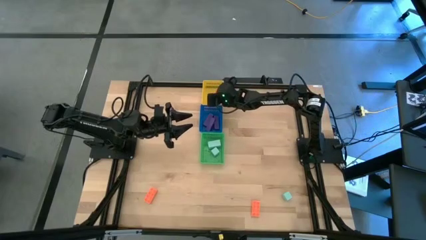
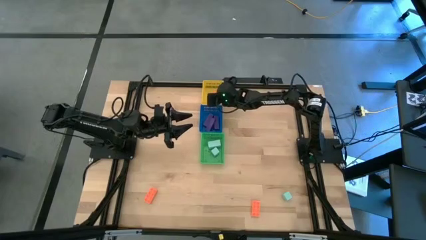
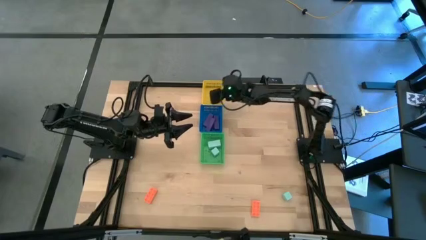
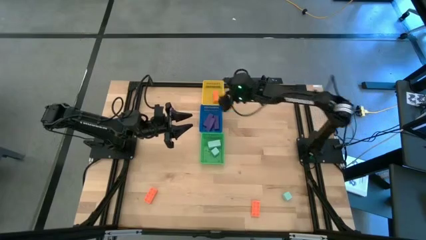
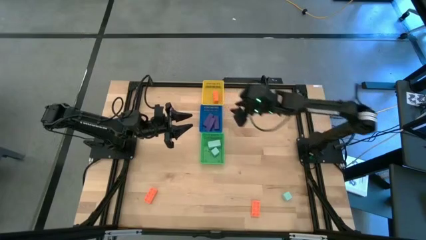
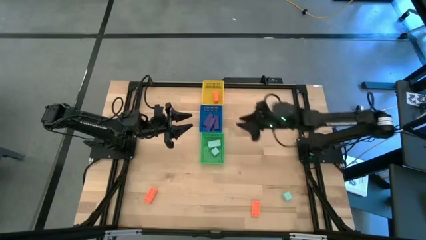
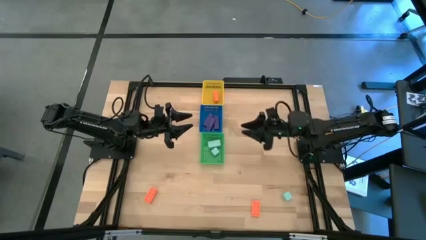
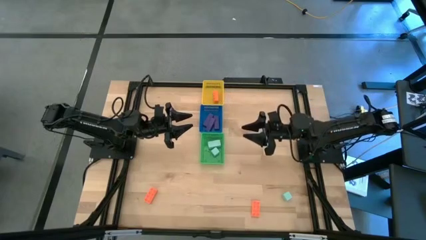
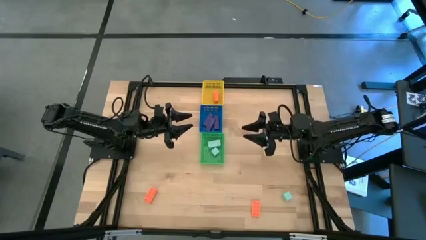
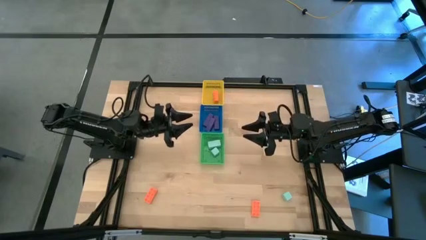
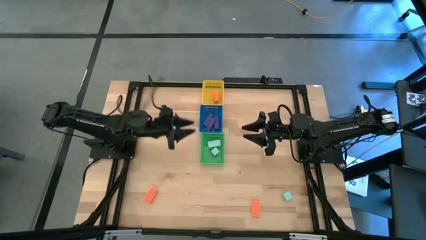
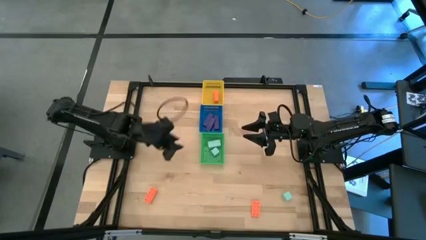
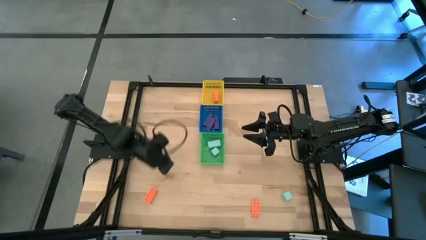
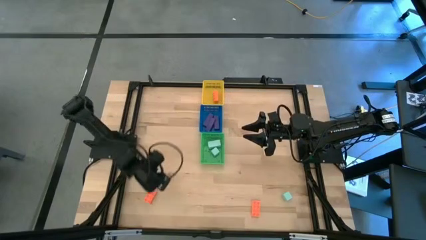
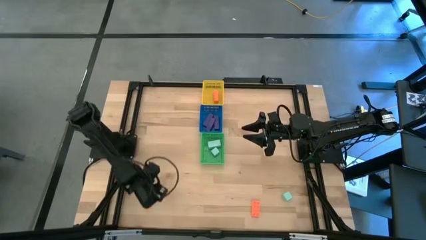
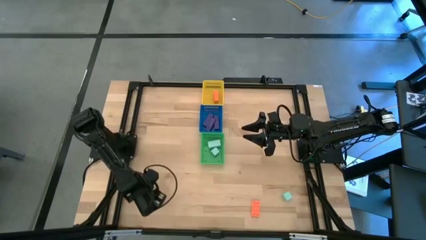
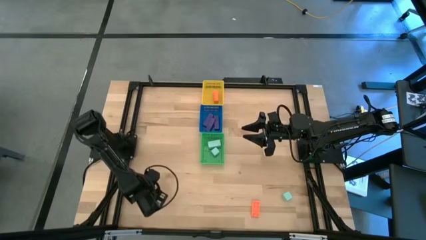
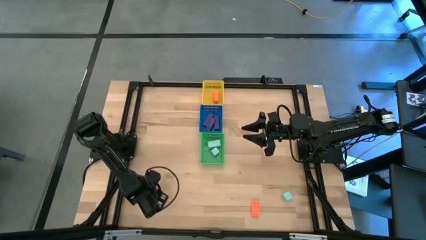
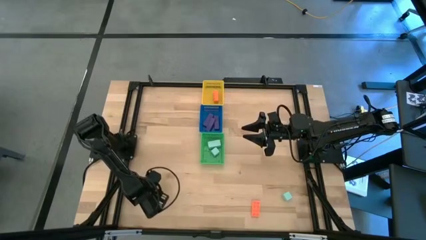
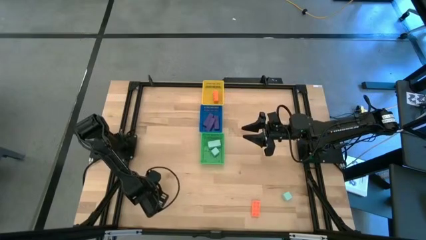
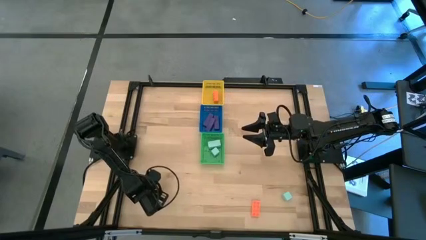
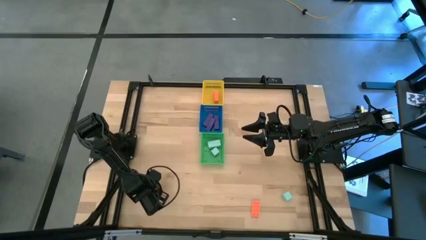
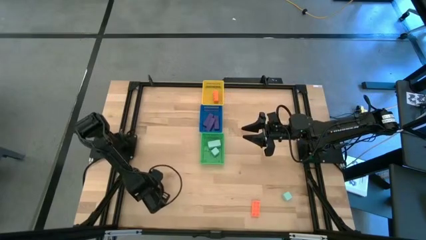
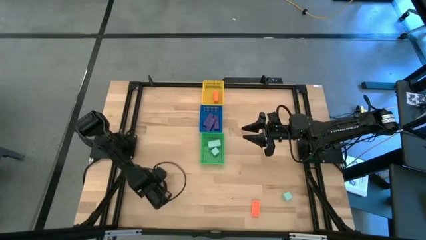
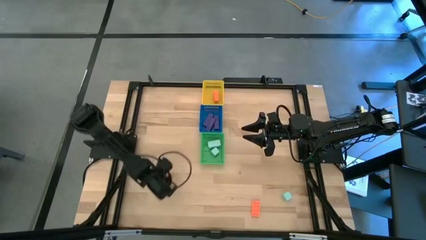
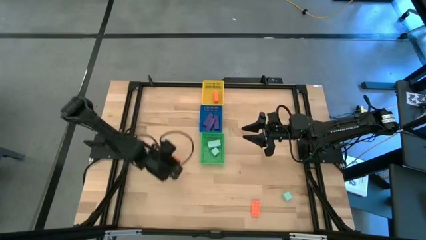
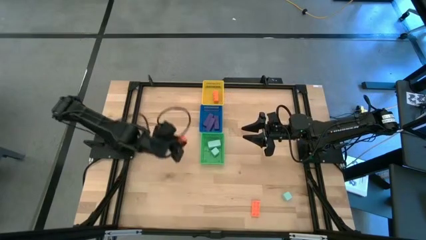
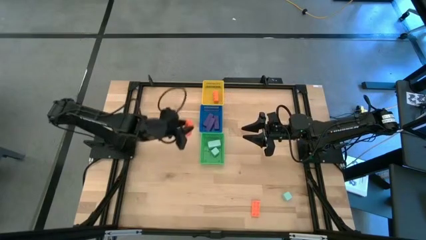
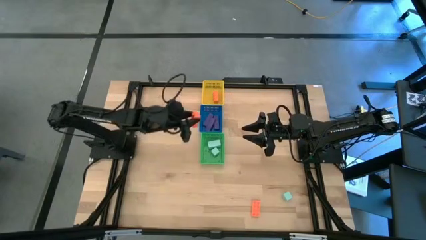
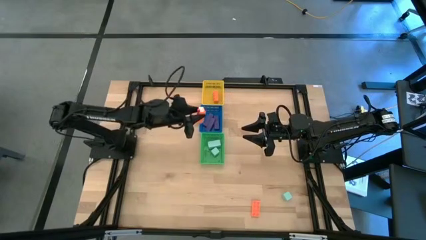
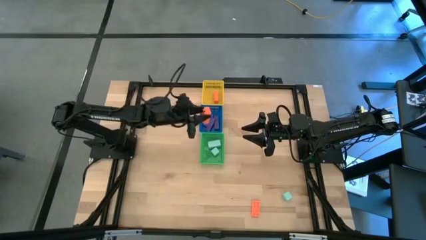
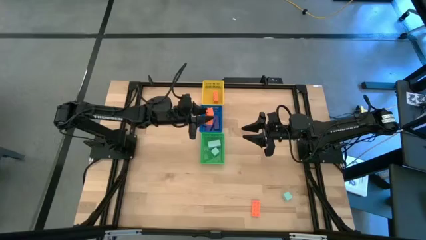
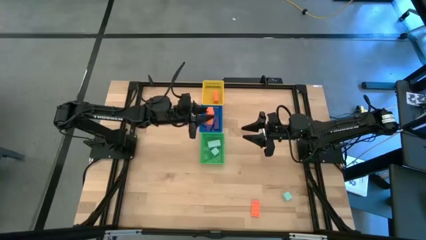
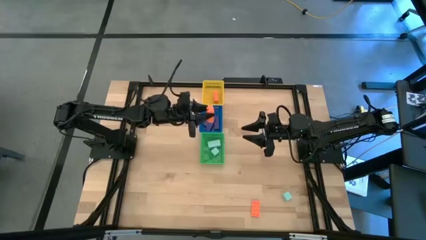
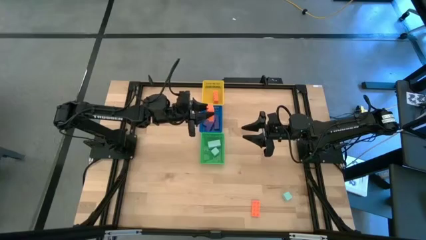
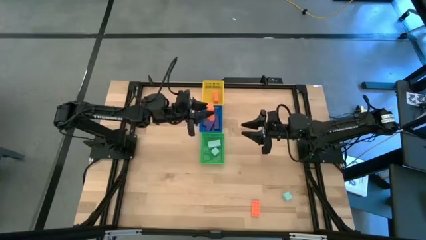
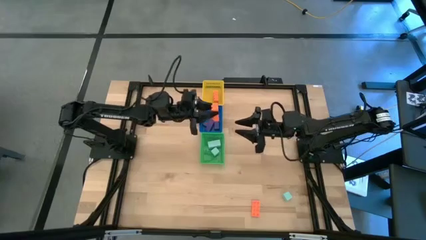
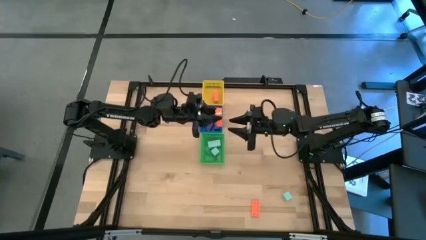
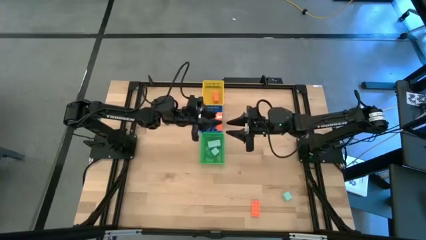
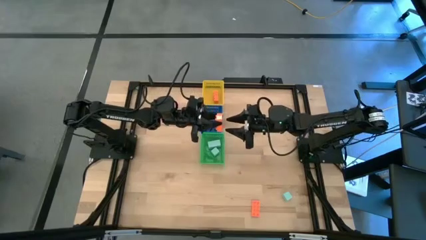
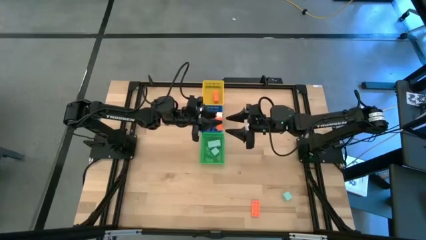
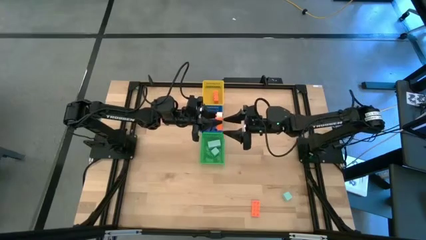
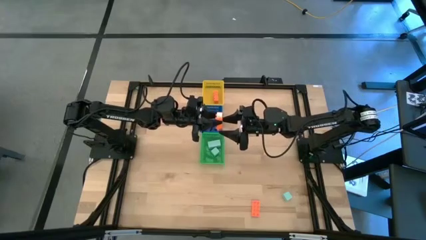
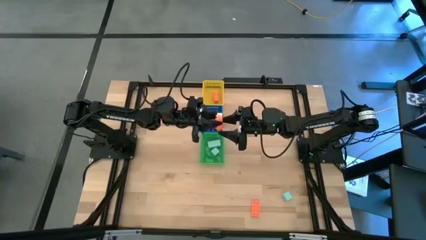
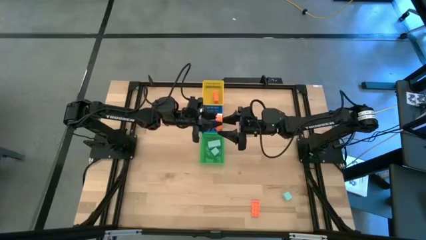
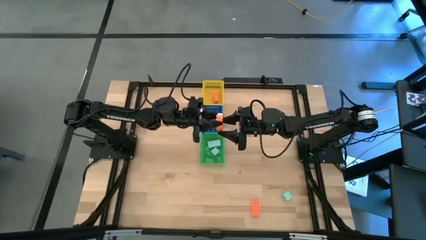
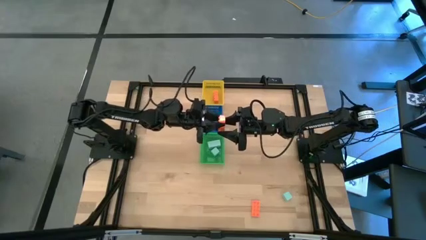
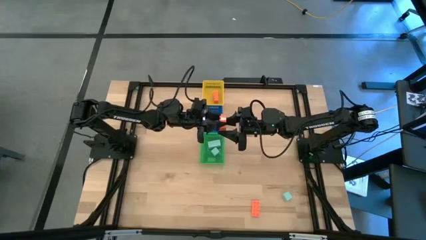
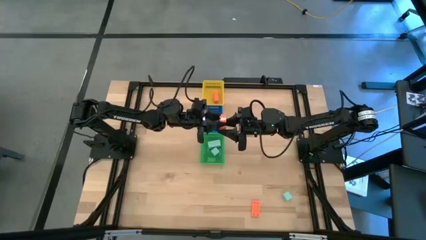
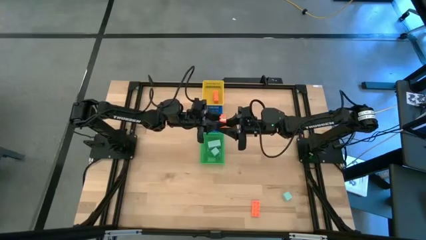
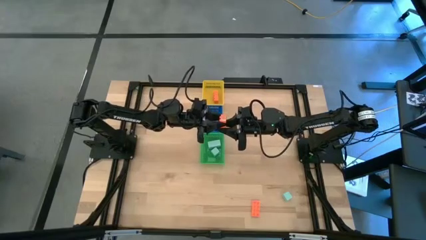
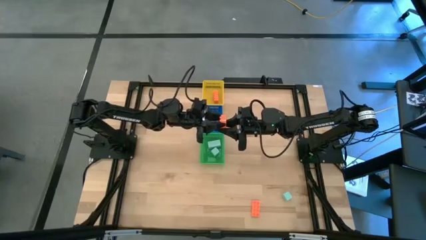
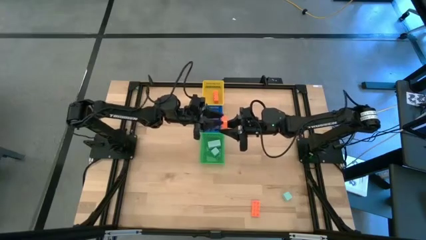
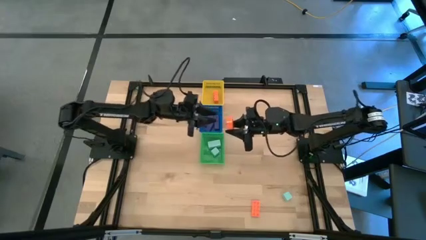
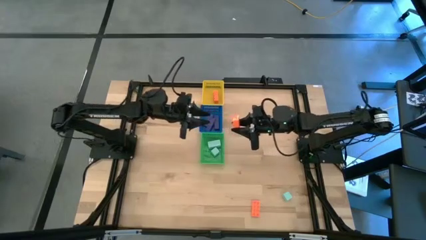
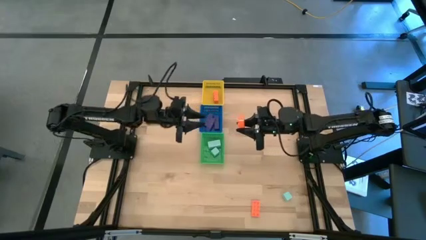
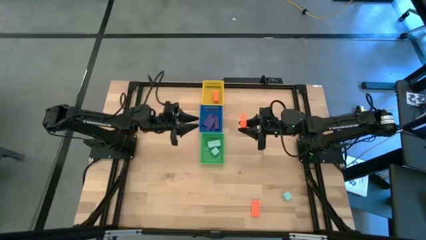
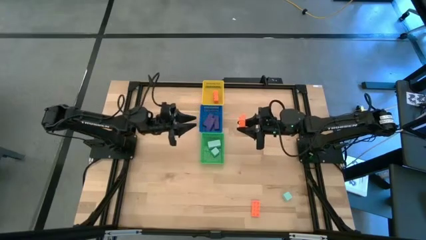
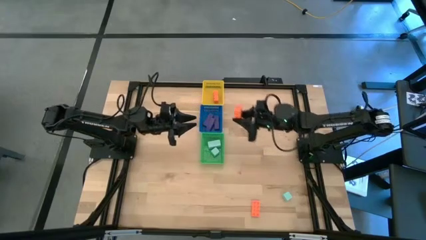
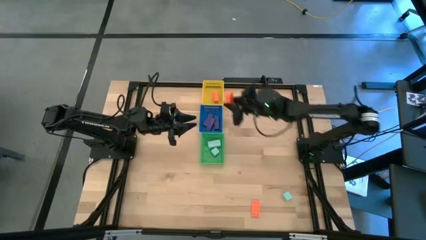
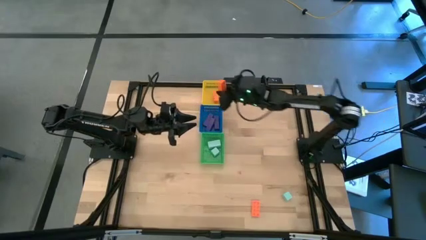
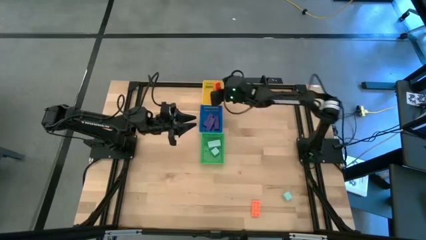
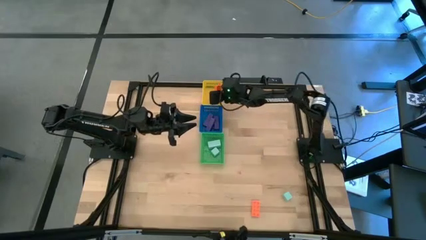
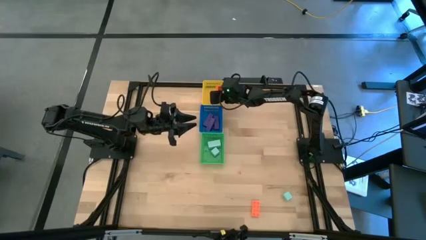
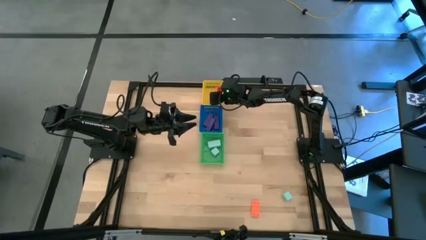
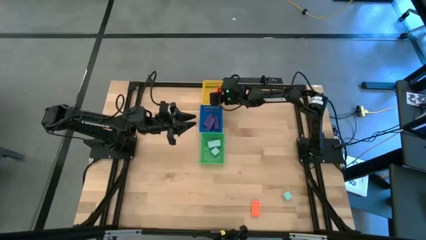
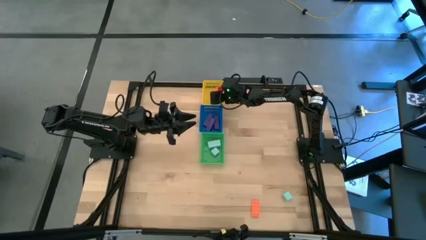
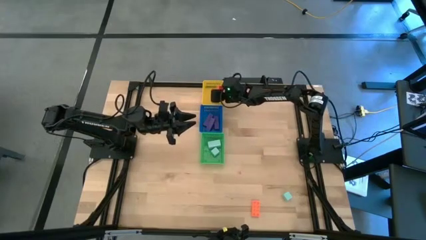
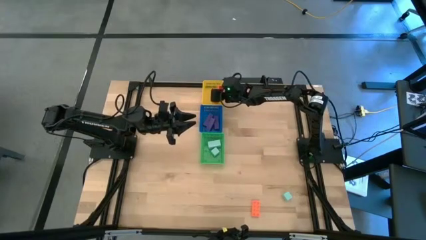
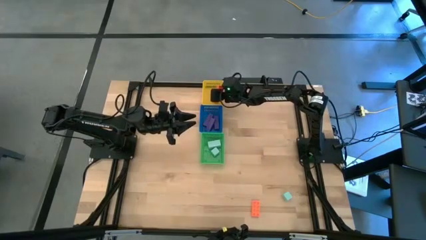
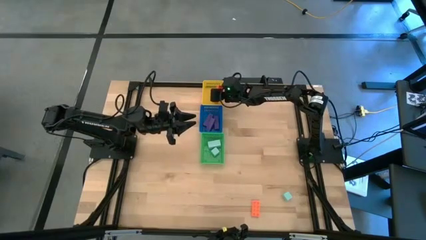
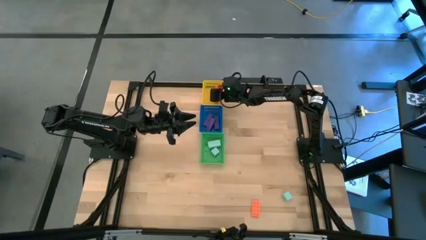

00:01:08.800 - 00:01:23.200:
Task: Sort & place blocks by color
Put the left orange game piece into the yellow basket

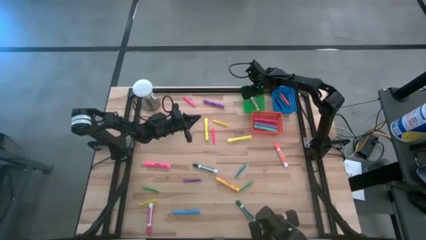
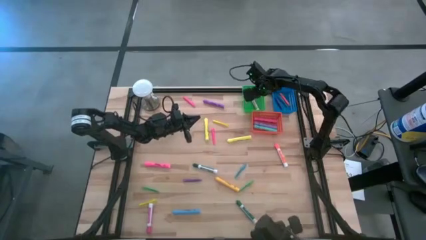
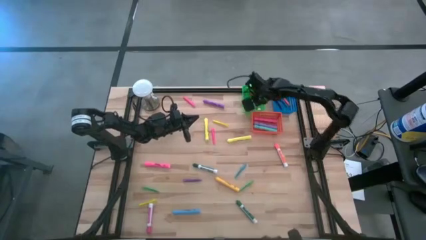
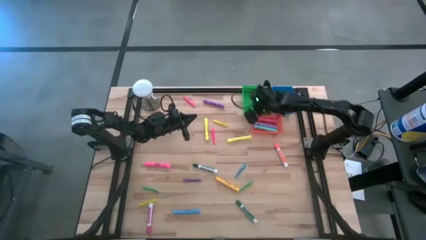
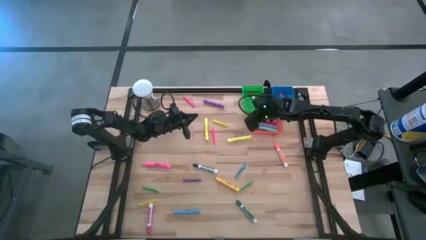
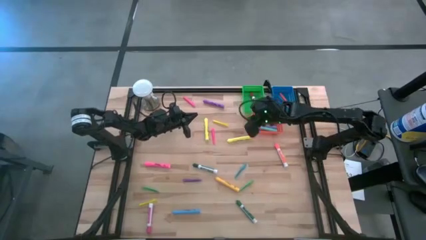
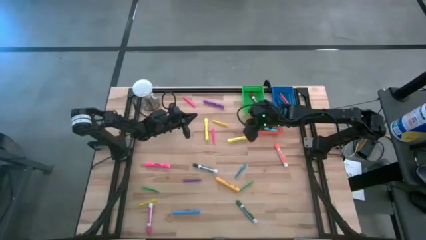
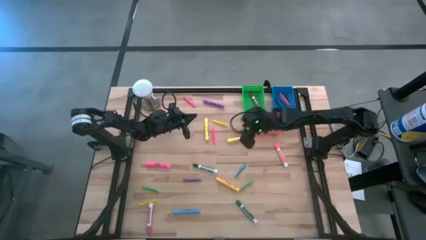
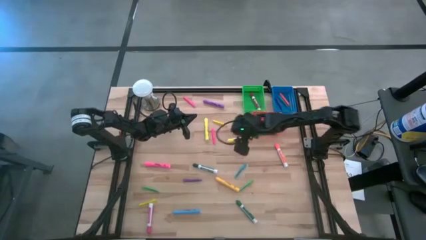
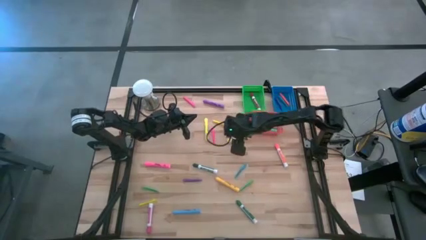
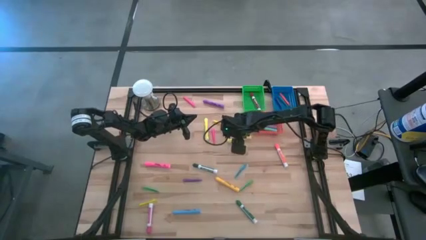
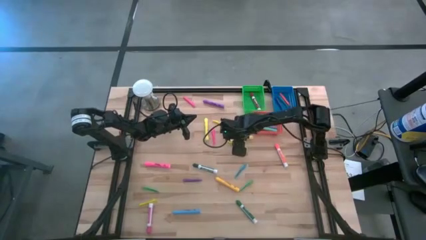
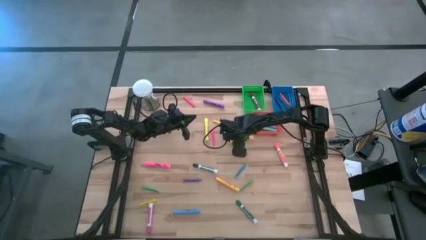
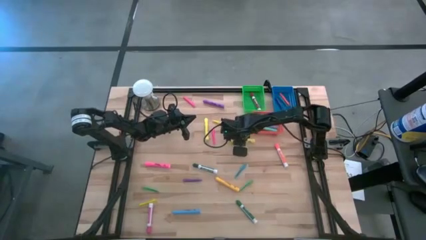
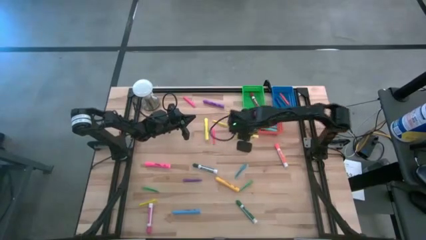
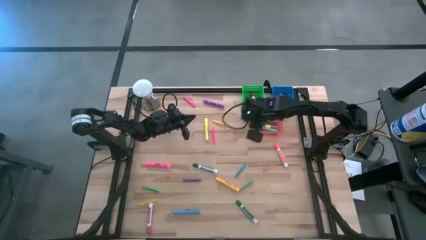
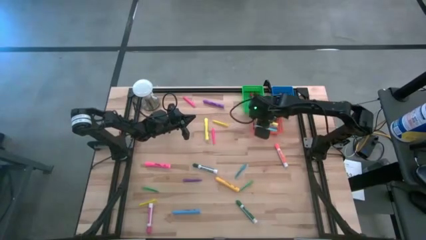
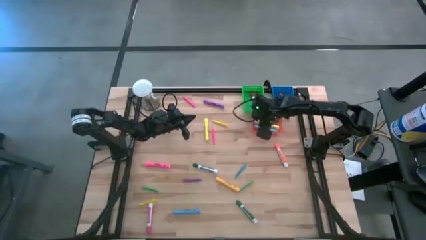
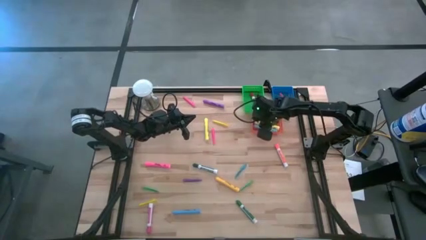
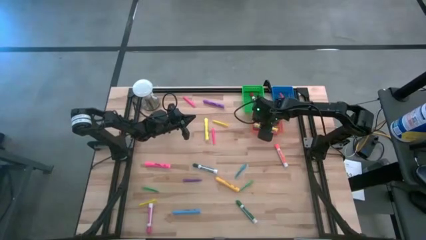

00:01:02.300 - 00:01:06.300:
Task: Pick & Place Markers
Put the right yellow highlighter pen into the orange bin
